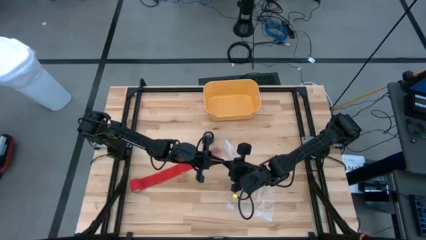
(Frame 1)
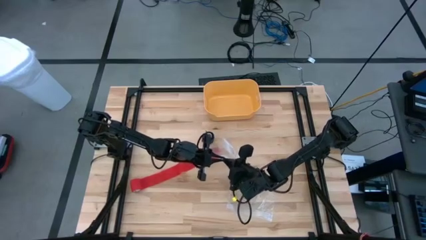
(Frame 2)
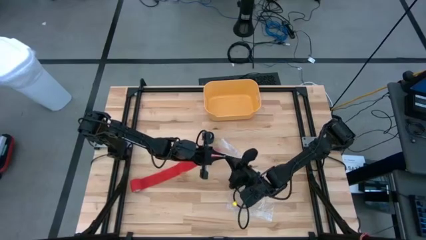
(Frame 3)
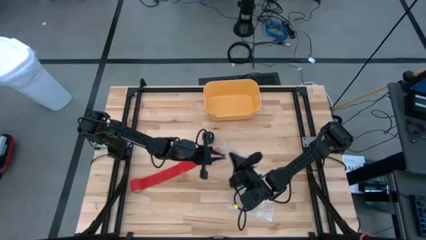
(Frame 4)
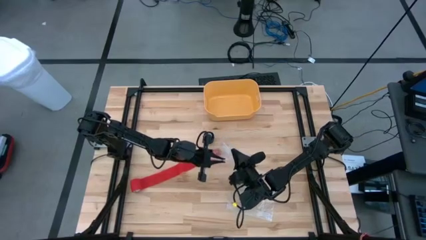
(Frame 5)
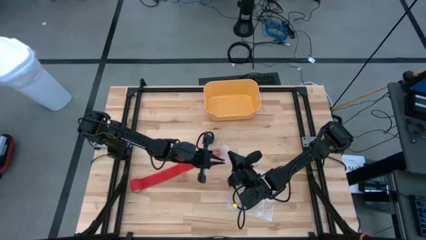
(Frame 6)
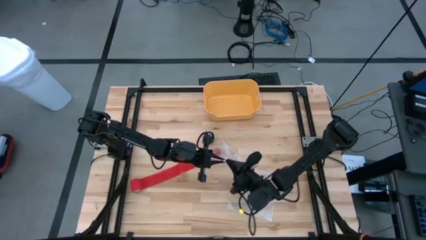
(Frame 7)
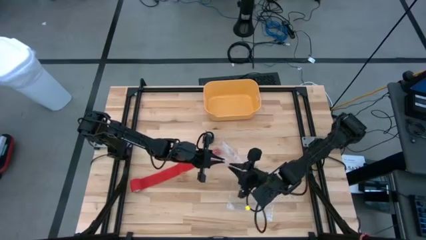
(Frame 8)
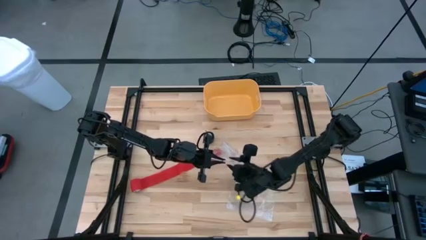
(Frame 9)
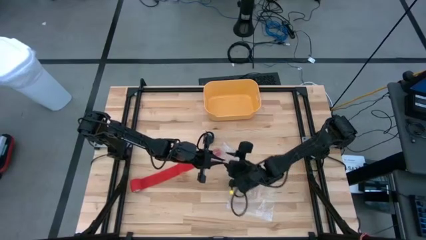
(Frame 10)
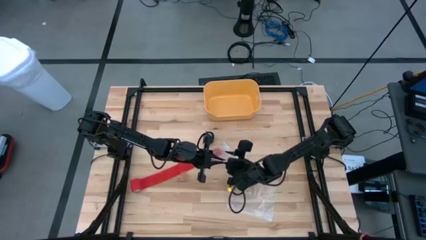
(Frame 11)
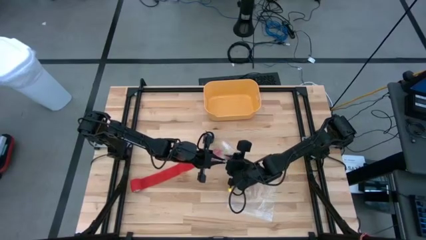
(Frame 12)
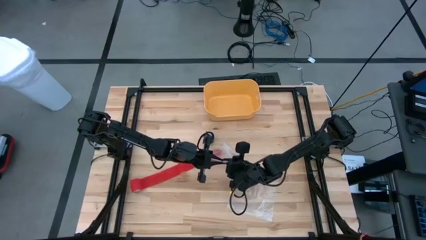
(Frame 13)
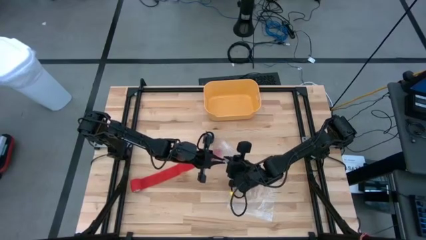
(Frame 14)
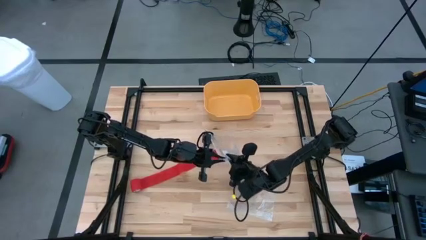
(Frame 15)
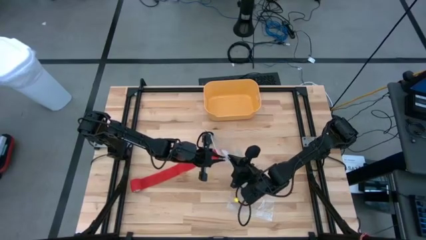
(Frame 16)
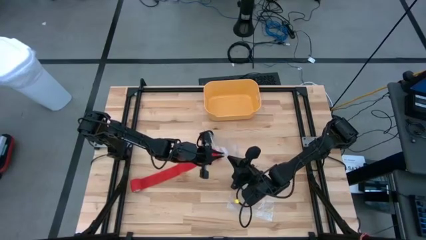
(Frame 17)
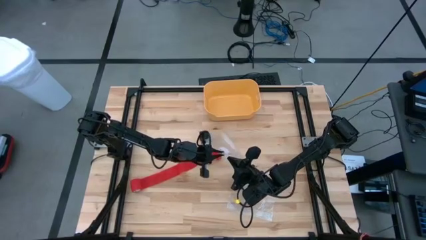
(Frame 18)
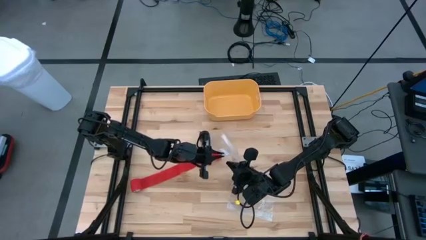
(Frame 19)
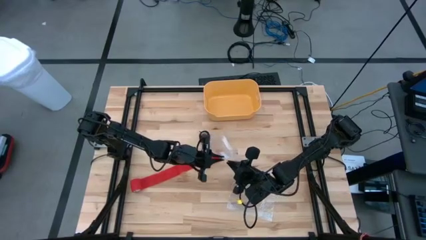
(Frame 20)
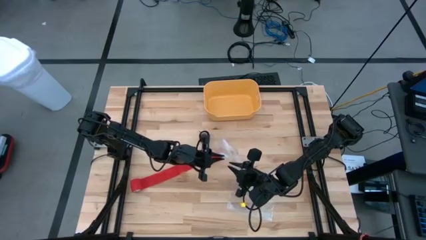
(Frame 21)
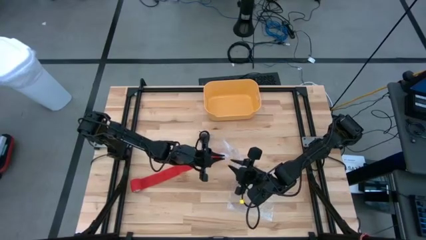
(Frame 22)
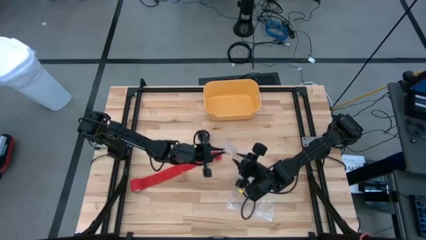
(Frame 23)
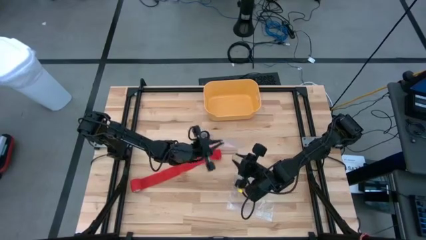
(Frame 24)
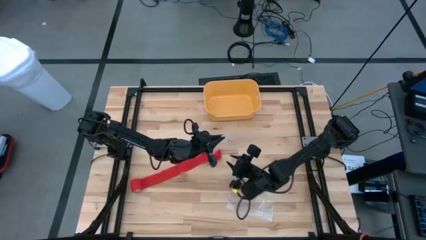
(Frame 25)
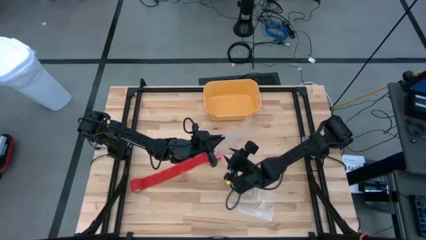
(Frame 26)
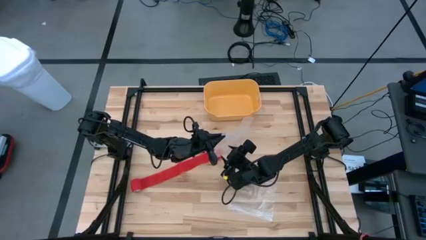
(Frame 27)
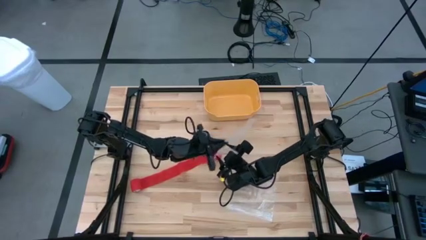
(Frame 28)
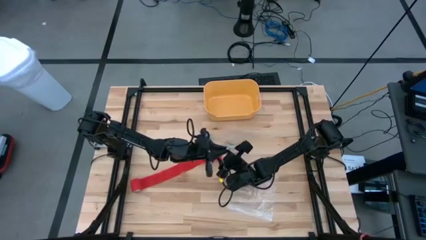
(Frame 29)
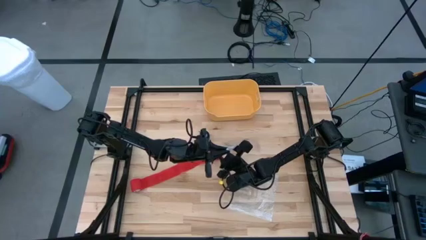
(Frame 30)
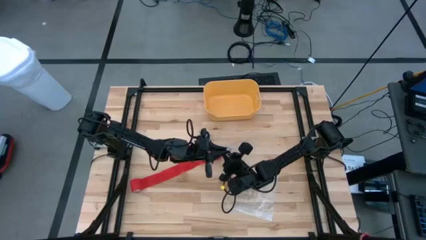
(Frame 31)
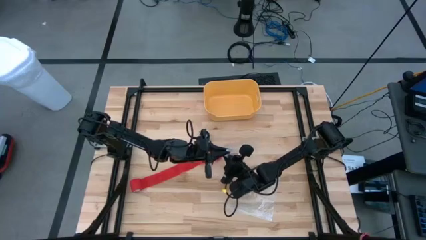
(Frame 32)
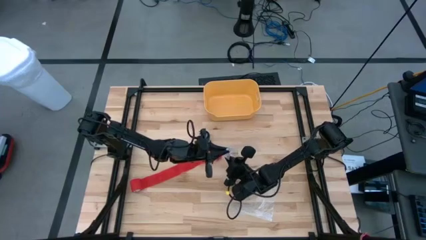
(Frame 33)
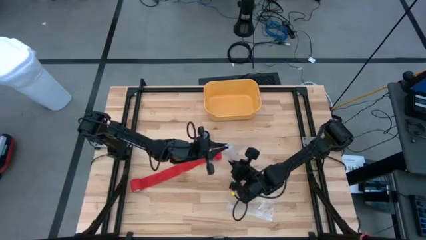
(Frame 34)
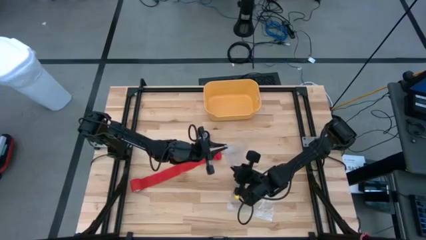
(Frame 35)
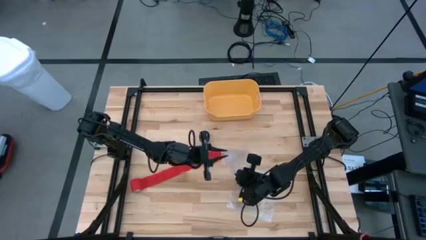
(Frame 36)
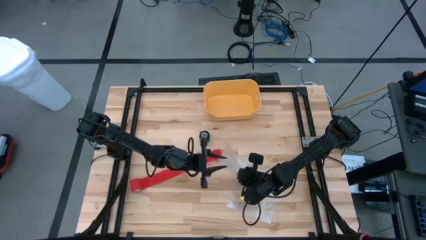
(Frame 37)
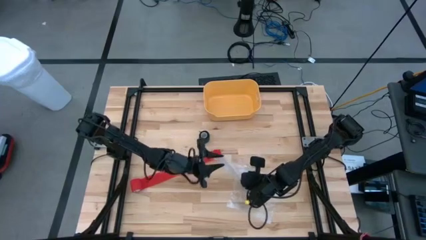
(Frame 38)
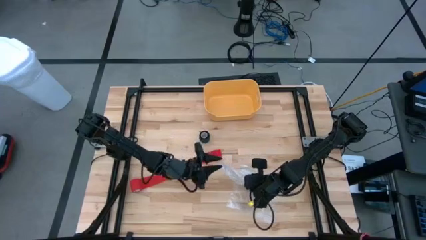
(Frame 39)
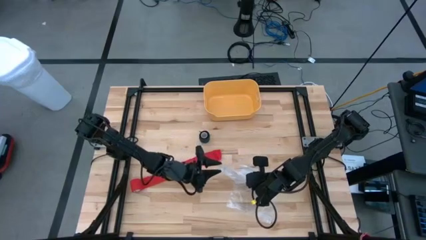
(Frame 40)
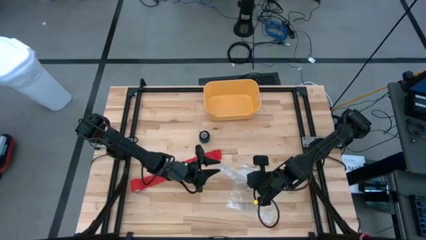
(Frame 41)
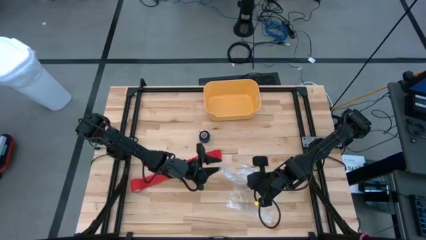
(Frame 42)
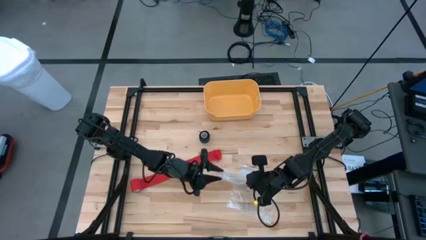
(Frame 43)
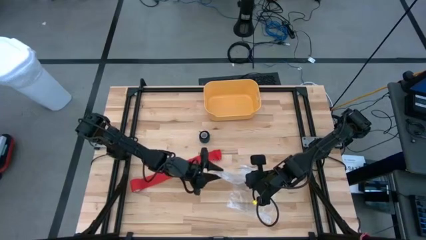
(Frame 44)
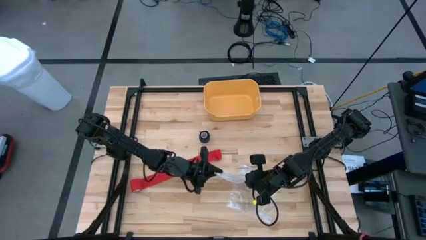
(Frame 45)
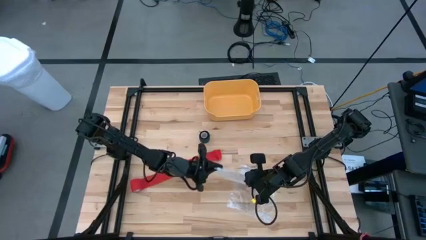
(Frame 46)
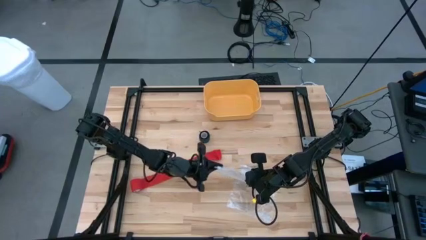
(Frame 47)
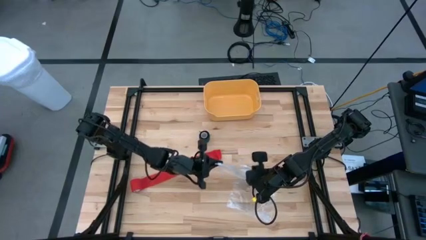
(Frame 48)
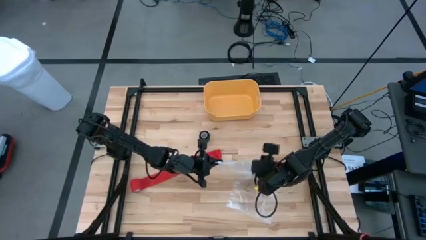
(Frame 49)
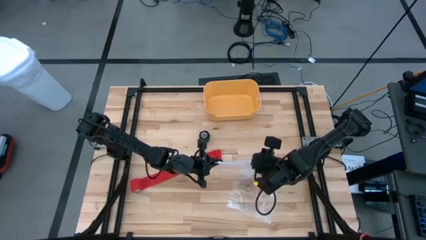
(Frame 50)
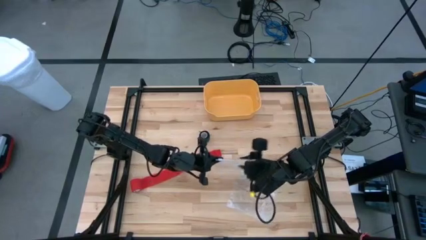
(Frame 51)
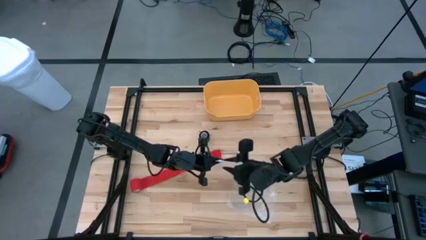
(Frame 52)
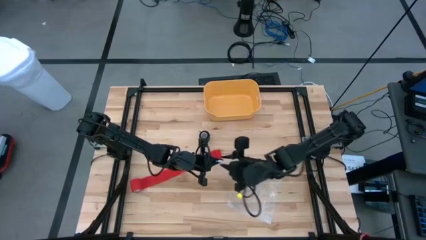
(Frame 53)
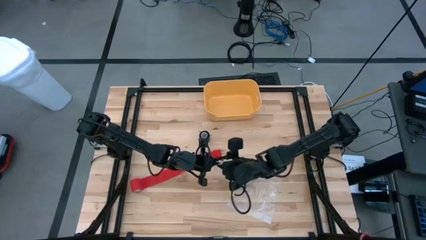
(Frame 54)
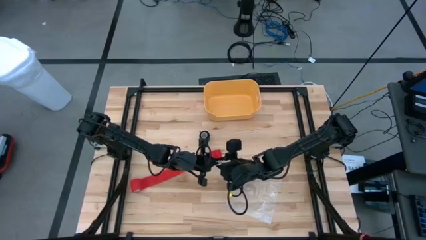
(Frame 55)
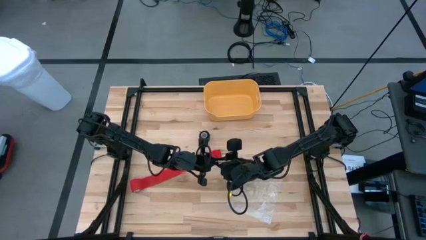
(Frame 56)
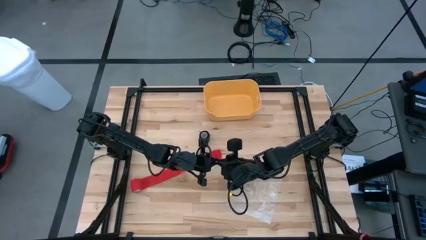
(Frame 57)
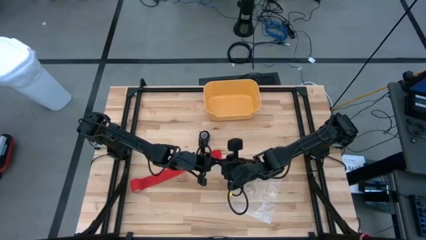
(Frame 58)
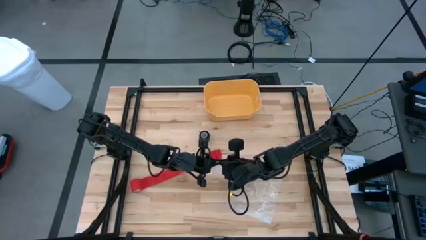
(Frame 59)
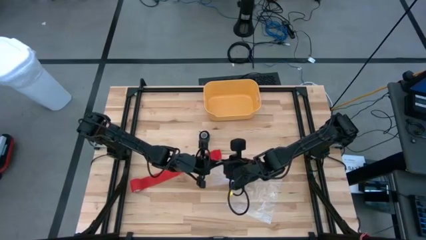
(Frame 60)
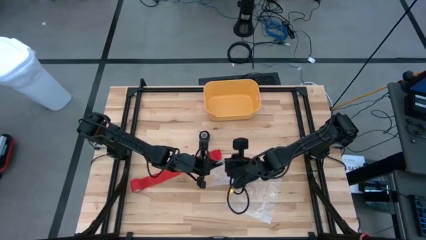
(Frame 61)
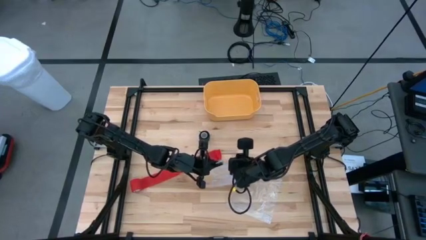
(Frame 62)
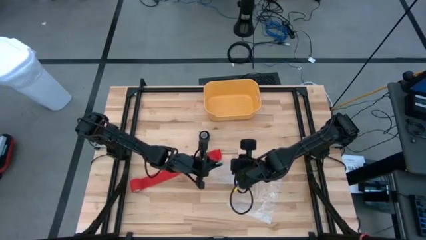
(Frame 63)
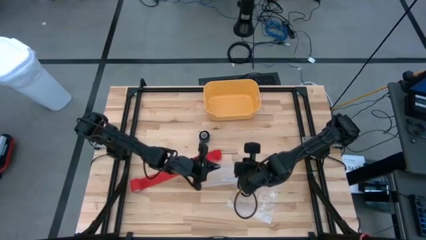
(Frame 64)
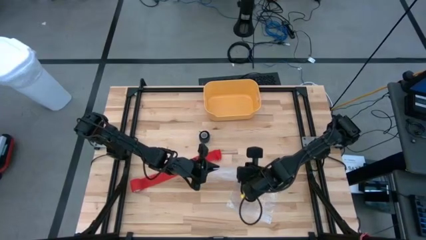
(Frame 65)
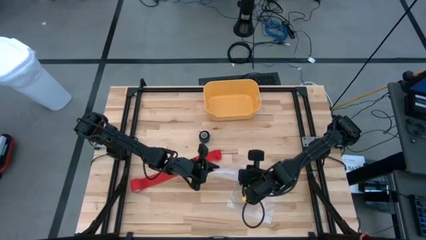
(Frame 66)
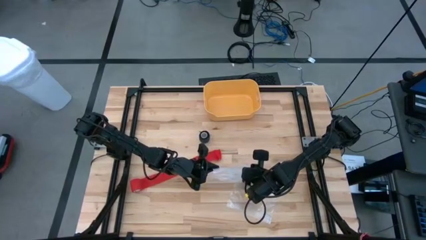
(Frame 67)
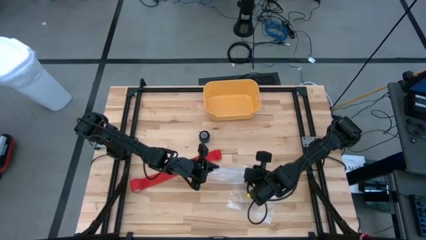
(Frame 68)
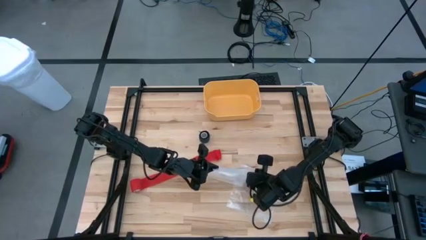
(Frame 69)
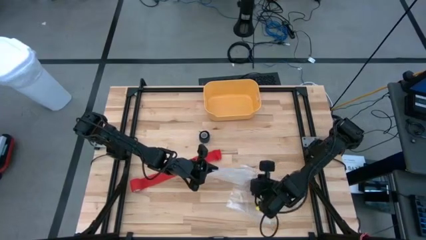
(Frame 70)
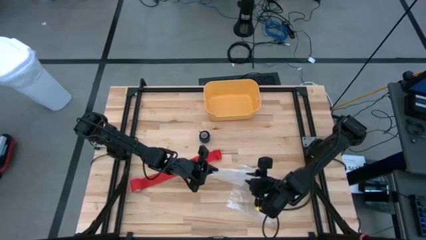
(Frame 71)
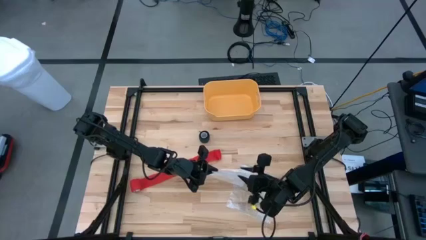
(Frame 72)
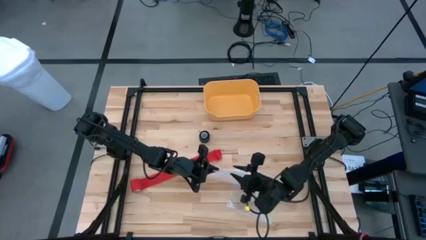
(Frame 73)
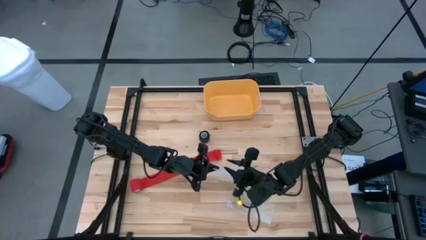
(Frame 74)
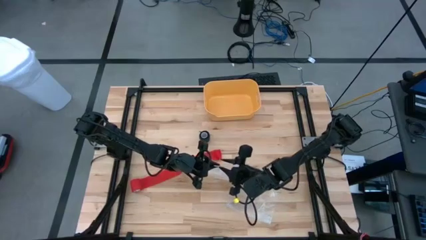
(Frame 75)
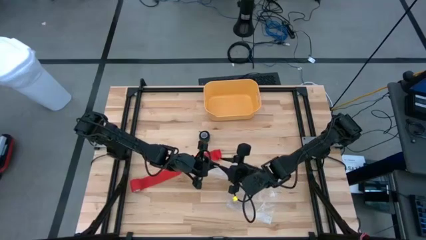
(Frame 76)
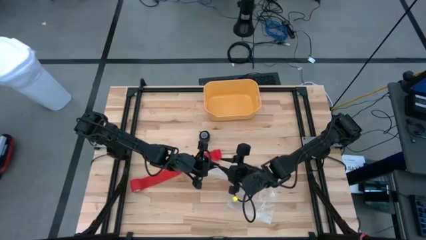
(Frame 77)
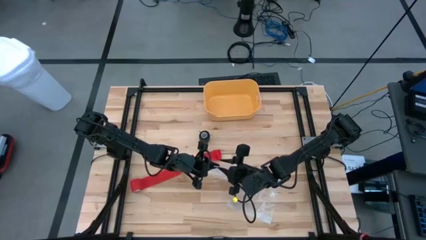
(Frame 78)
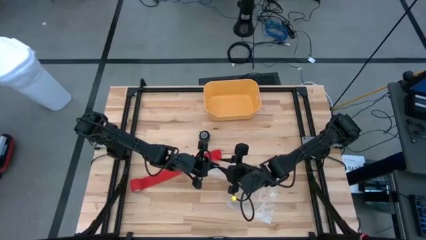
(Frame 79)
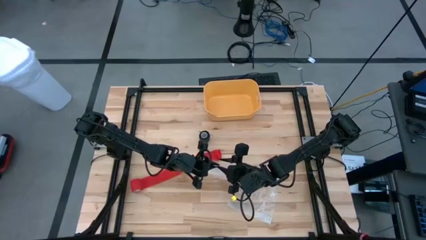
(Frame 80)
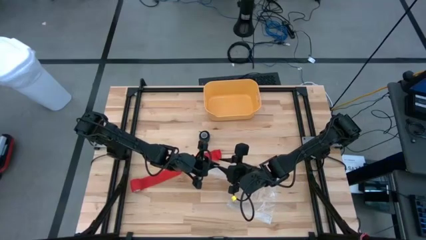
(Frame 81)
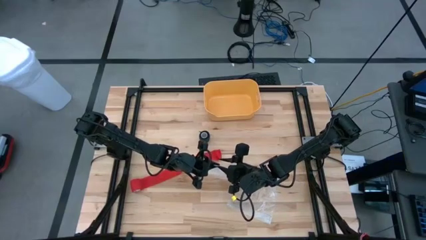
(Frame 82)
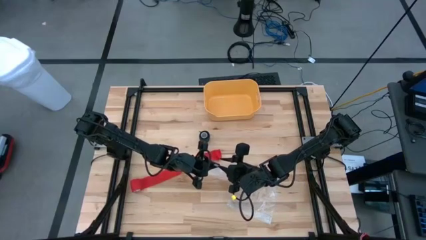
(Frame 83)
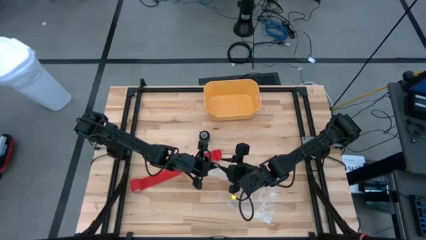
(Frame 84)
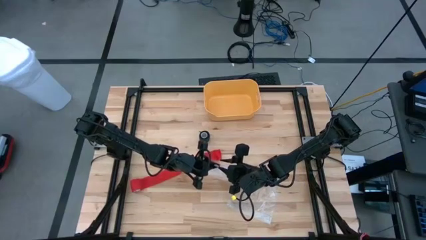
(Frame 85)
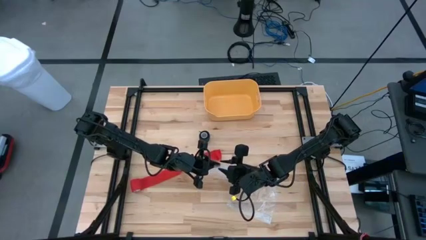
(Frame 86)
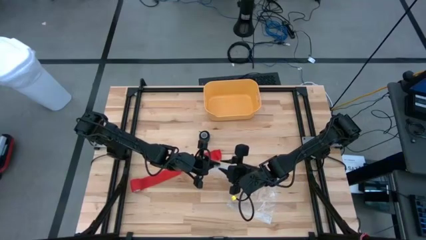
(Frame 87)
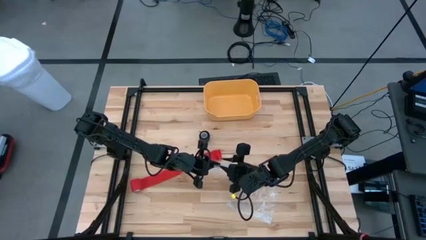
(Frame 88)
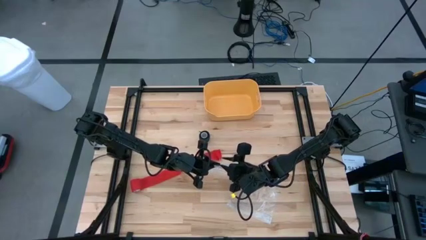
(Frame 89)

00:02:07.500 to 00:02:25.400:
Task: Roll bandage
Open the transparent zip bag
